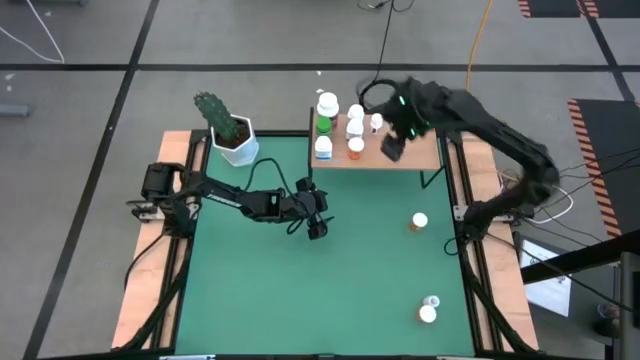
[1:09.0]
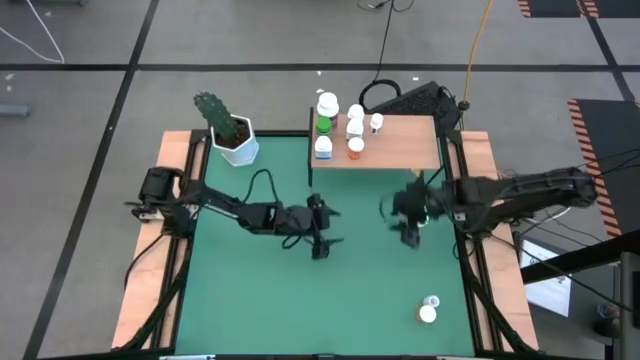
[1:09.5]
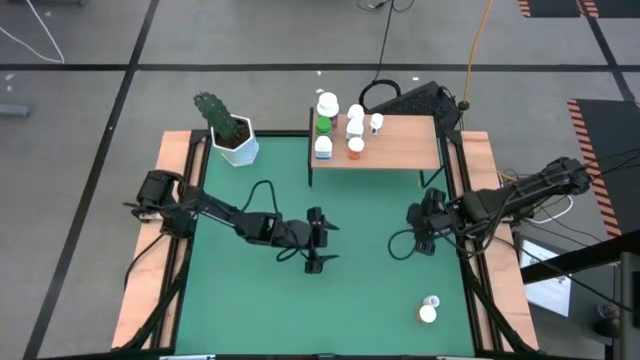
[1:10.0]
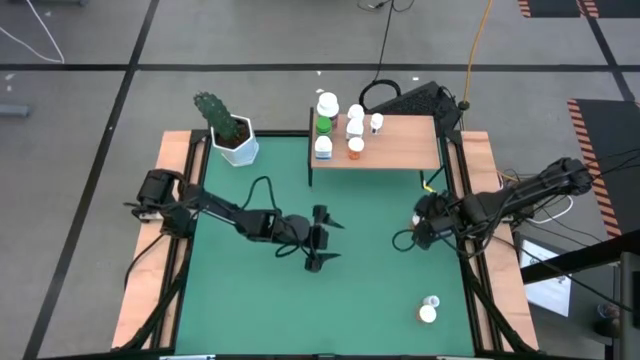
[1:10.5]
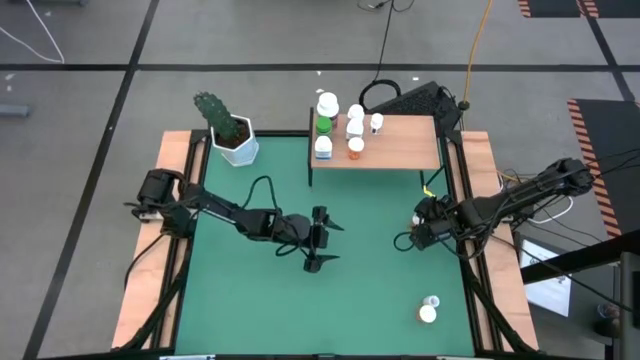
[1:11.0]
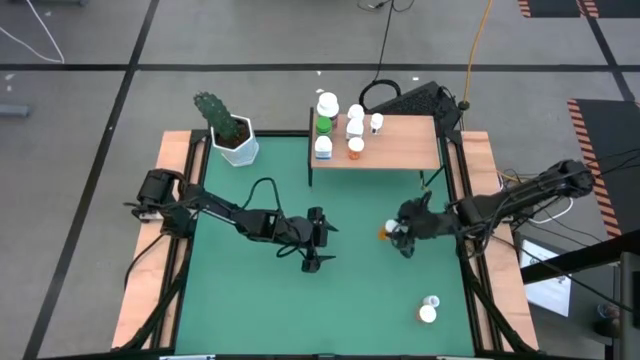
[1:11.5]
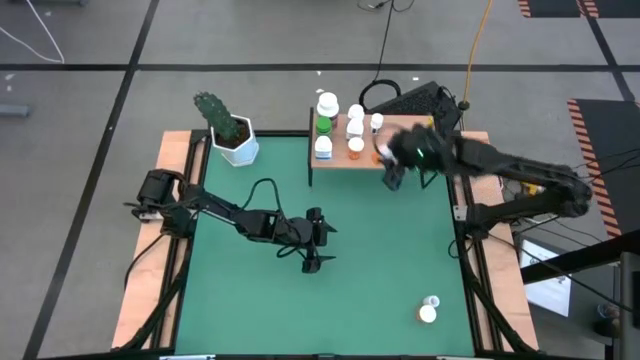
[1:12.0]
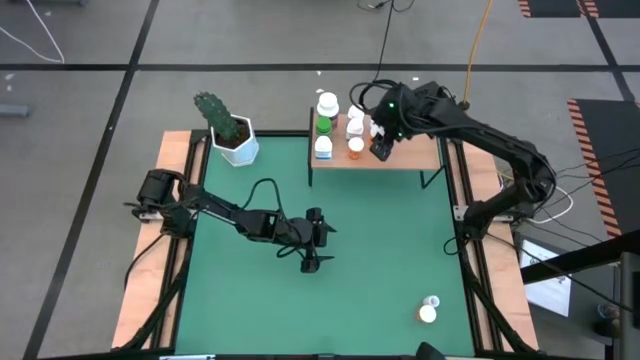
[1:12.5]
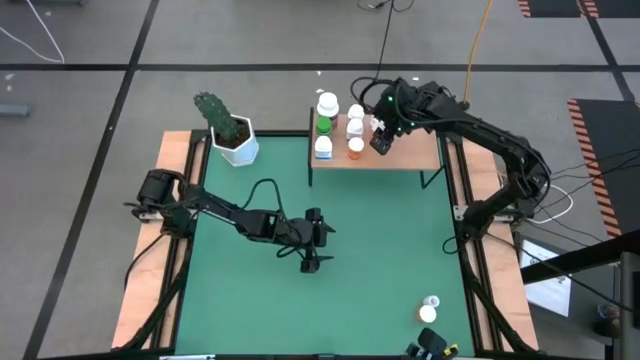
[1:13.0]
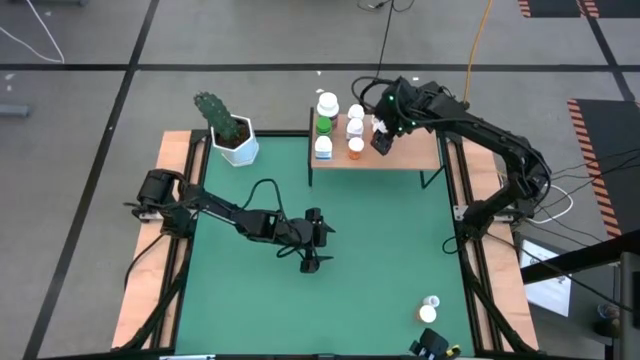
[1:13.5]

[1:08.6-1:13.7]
Task: Pick and place medicine bottles onto shelf by color
Put the top orange pill bottle on the shelf

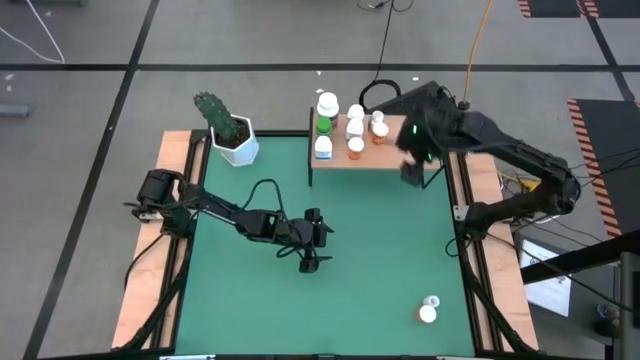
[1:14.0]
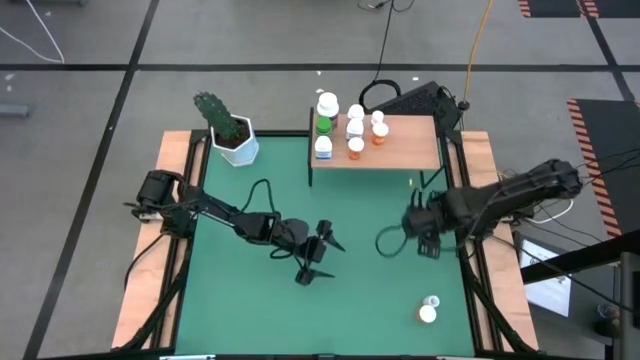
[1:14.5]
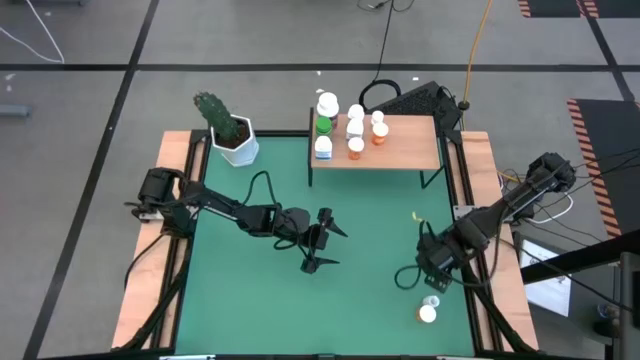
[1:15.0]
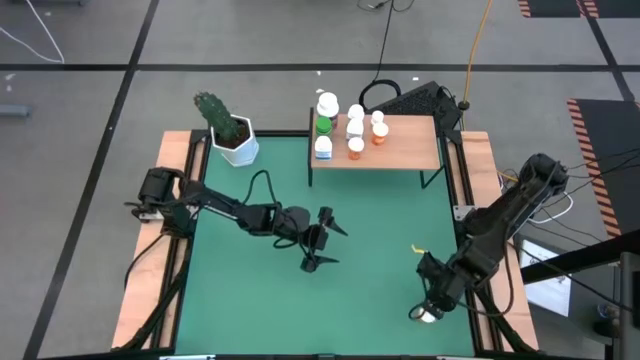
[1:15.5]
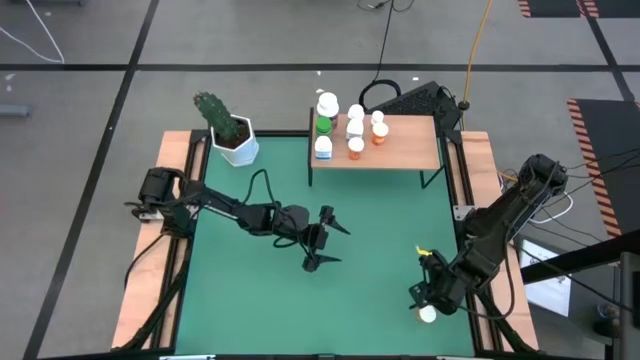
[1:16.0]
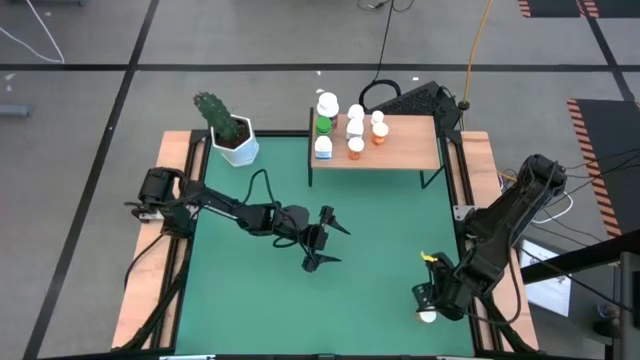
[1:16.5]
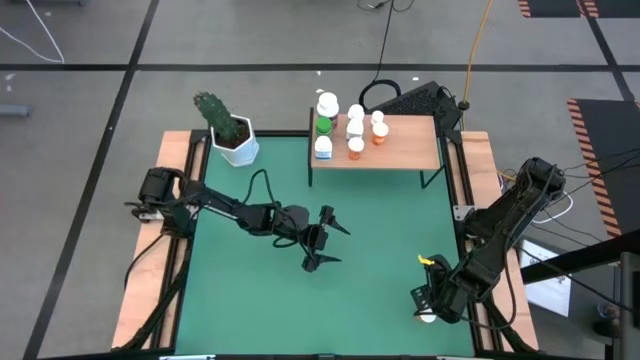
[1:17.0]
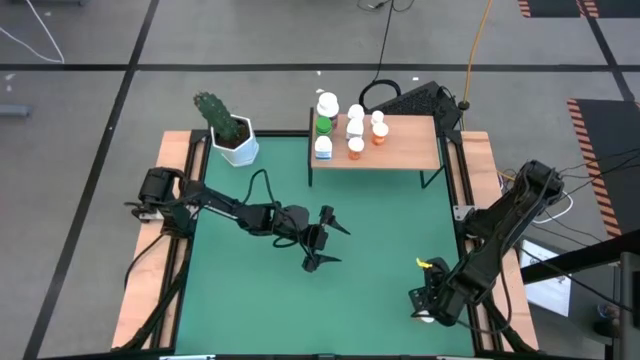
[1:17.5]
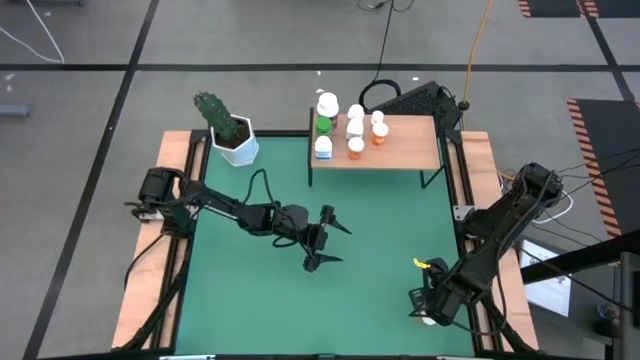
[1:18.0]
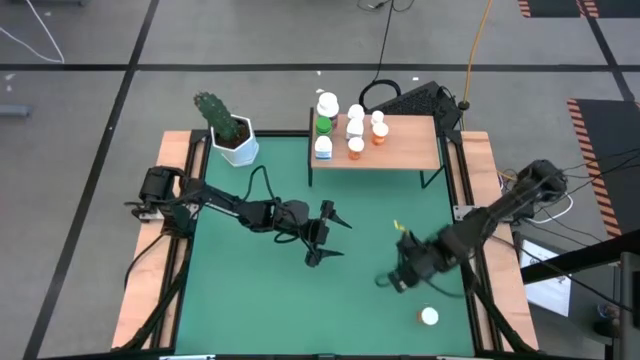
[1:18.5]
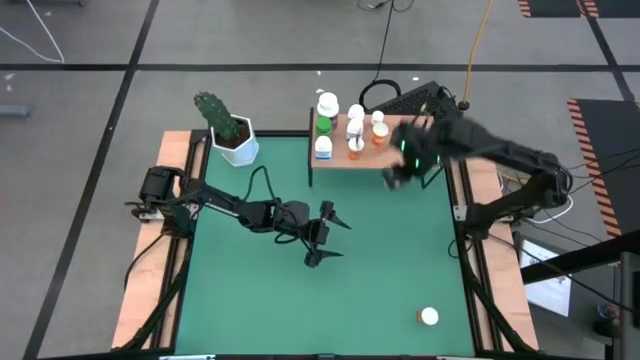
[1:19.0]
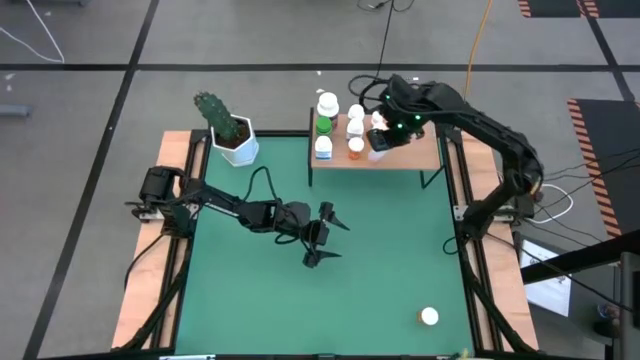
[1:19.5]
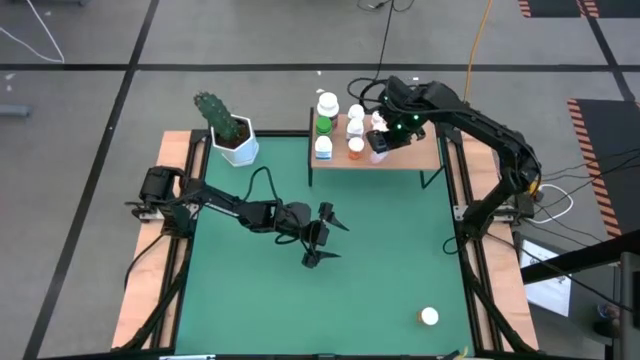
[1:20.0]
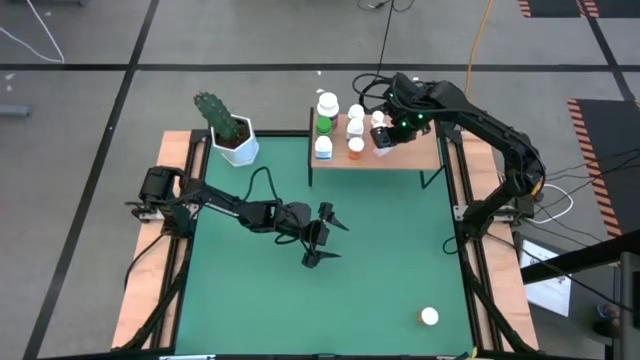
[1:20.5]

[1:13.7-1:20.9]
Put the transparent pill bottle on the shelf

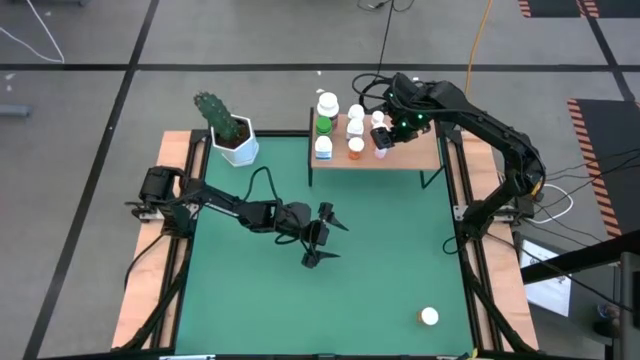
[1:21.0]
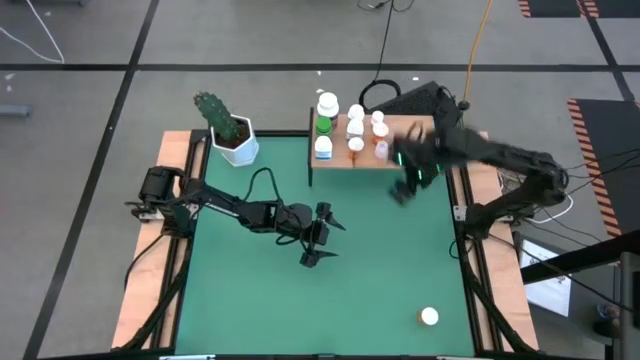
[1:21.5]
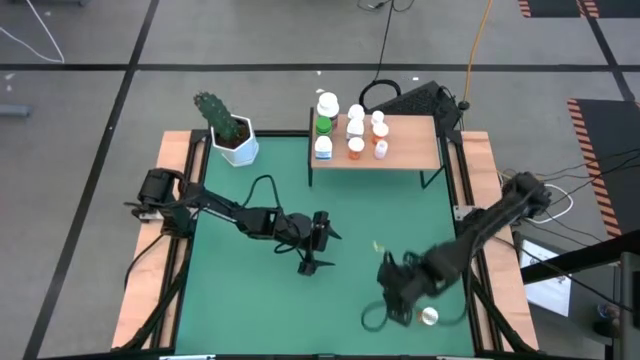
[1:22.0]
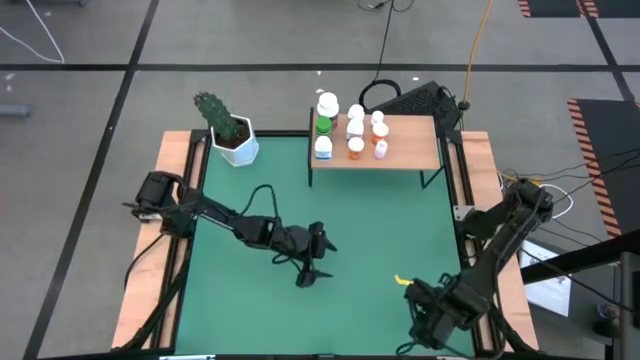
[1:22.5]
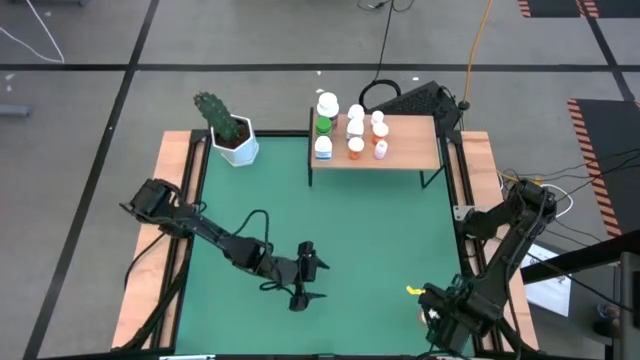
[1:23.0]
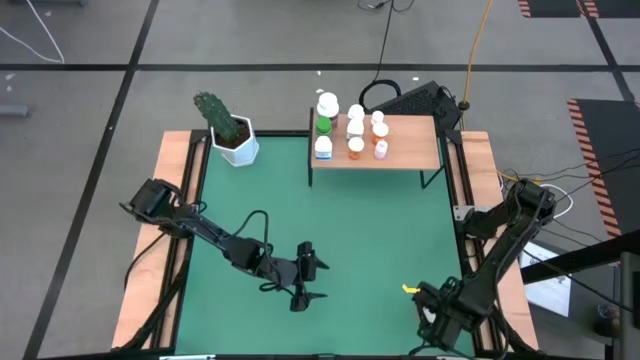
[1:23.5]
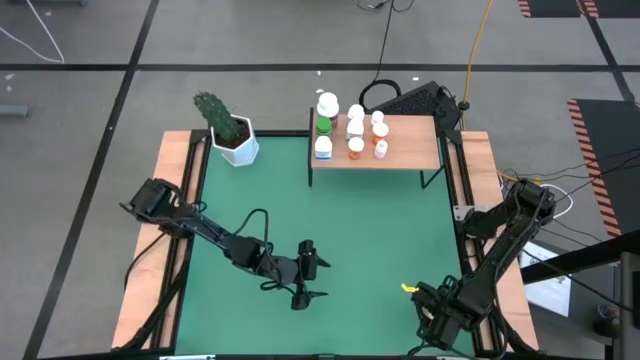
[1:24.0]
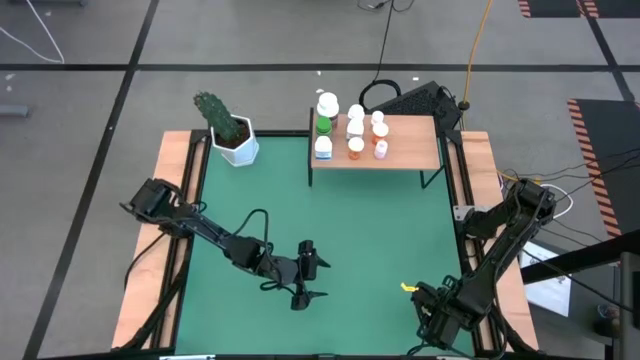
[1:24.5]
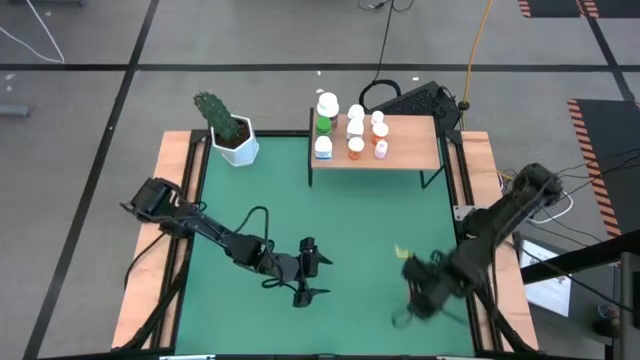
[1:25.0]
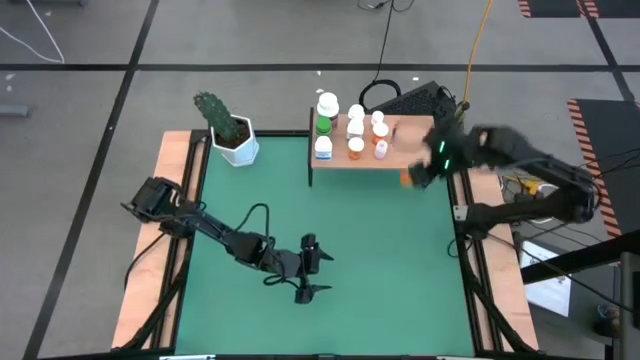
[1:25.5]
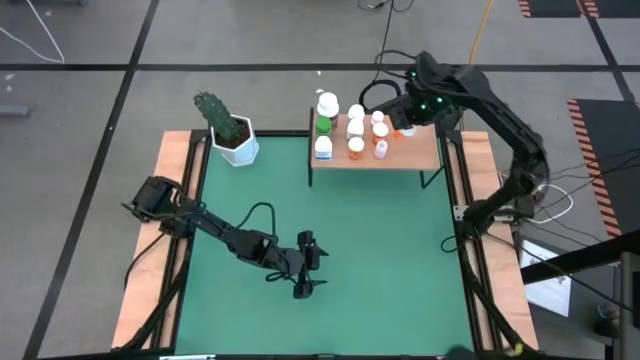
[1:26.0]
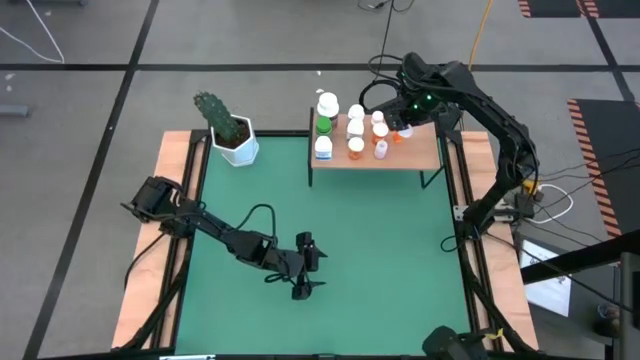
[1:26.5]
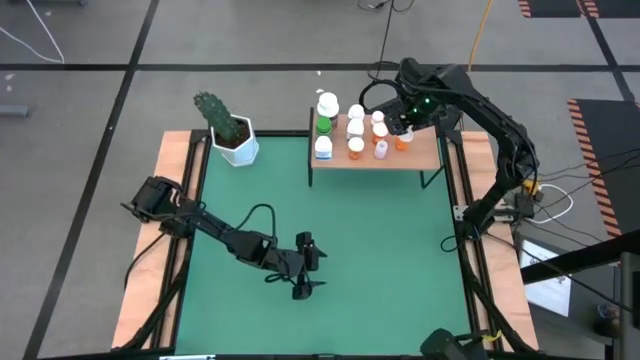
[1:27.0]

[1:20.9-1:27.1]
Put the orange pill bottle on the shelf

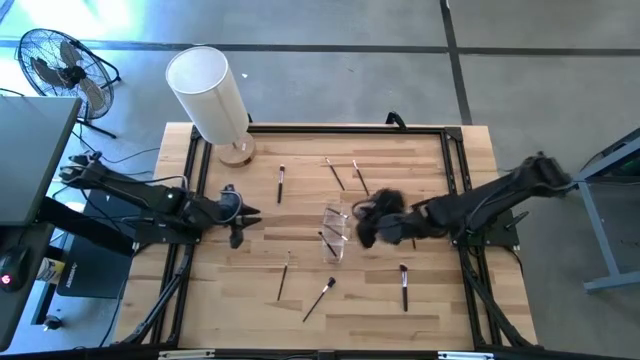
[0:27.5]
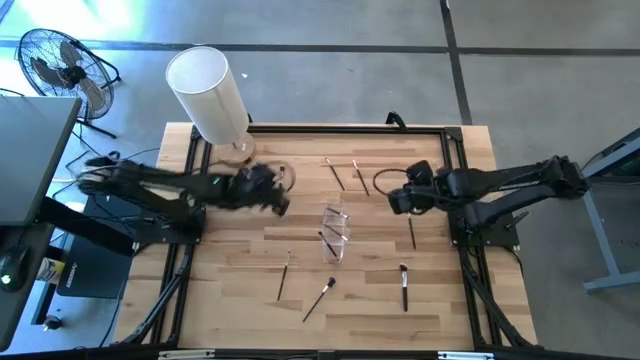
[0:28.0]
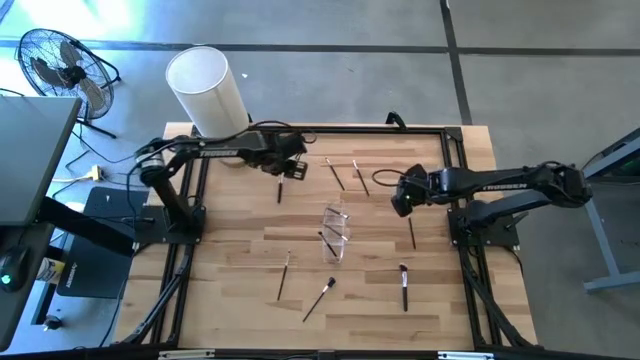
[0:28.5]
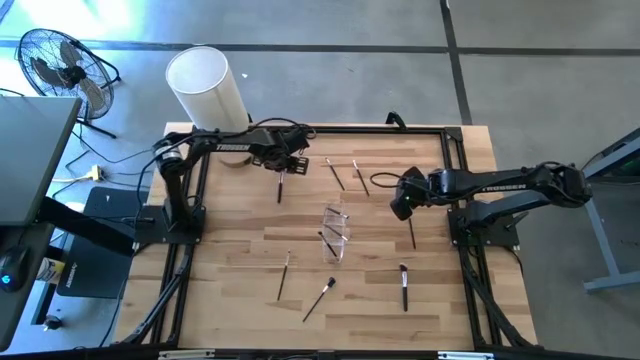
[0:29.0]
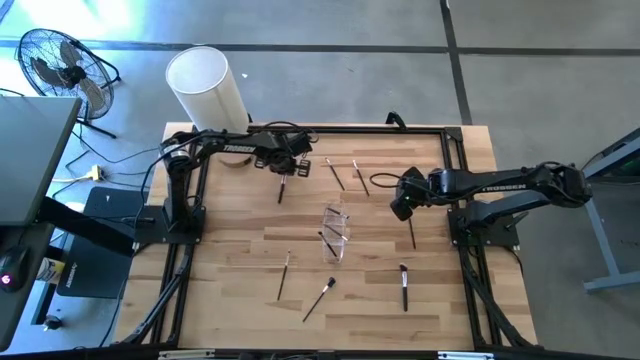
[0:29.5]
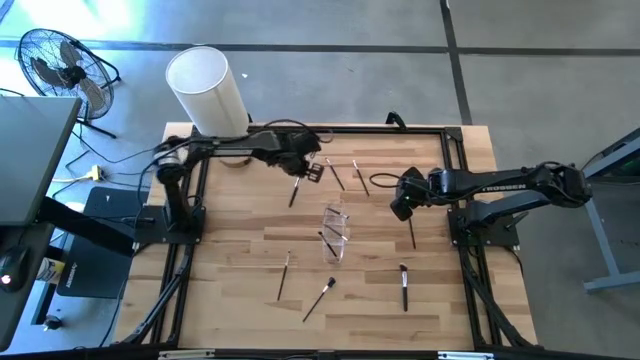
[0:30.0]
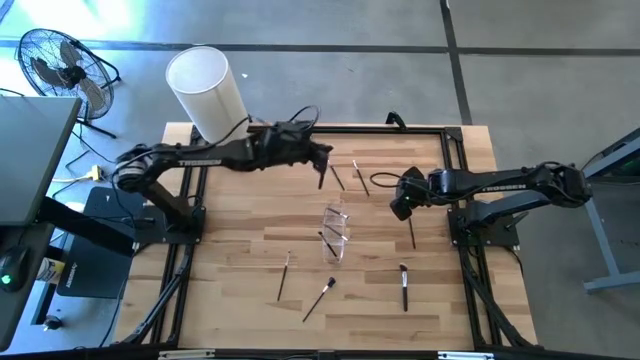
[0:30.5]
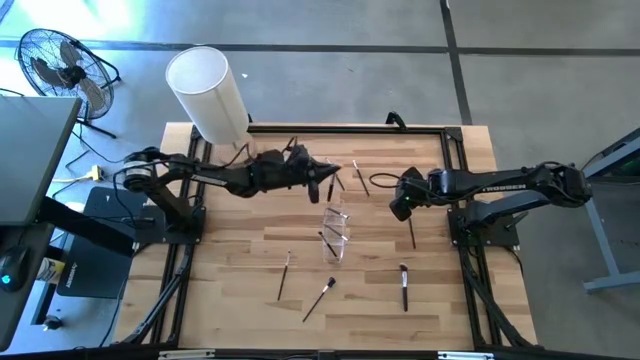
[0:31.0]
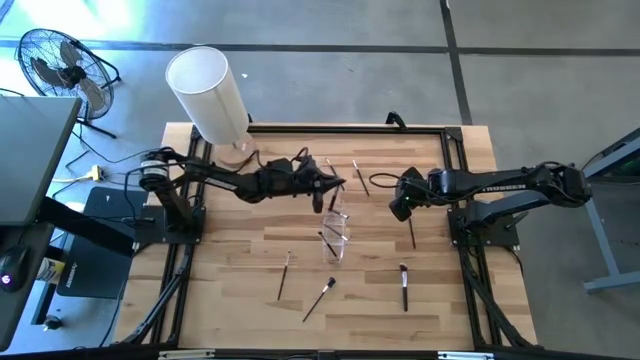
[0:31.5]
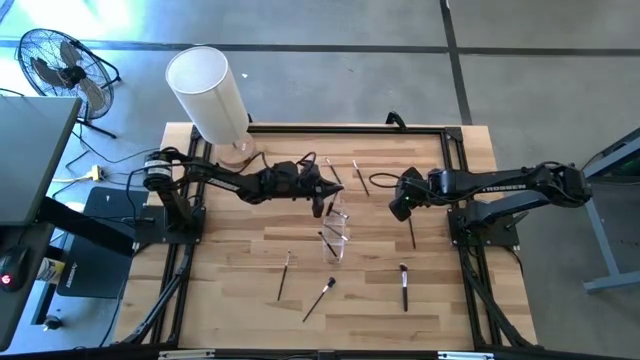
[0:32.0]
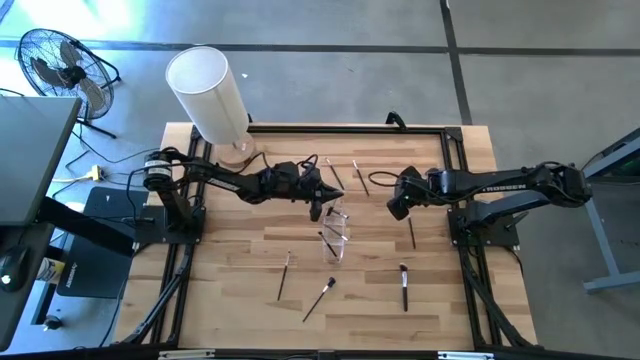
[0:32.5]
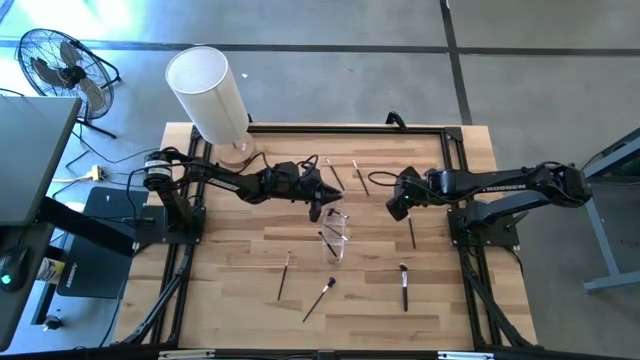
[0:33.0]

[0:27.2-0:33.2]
Task: Pick & Place Makeup Brushes
Put the blush brush into the transparent organizer
